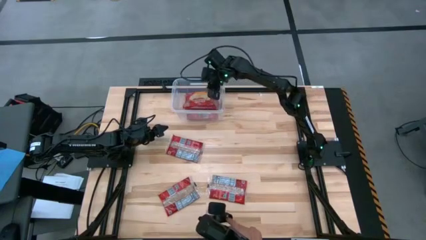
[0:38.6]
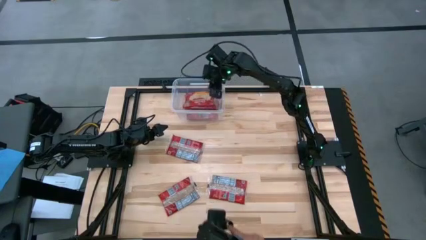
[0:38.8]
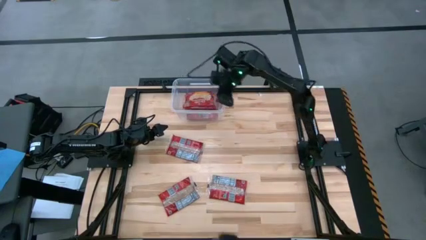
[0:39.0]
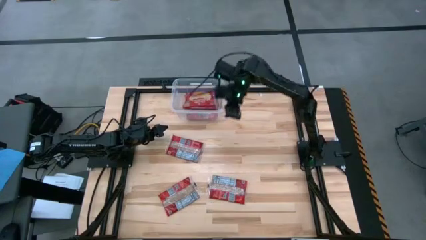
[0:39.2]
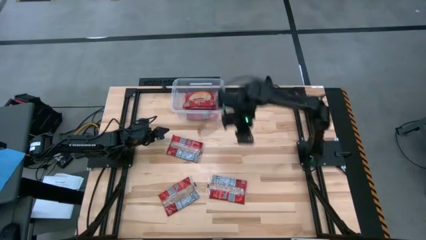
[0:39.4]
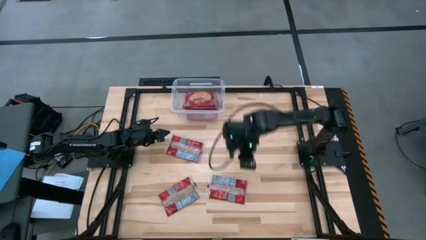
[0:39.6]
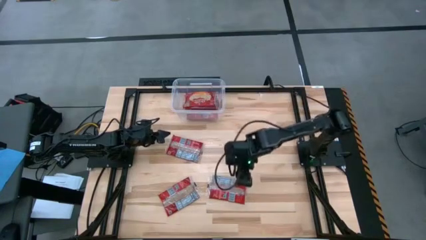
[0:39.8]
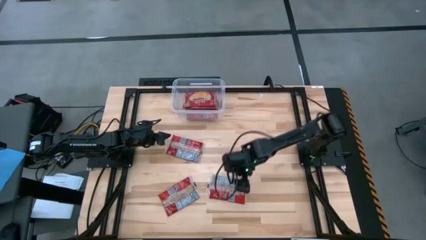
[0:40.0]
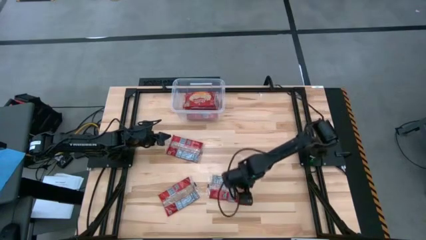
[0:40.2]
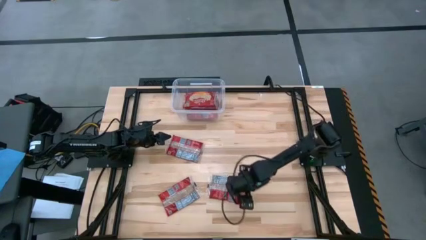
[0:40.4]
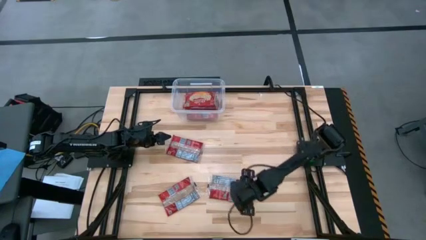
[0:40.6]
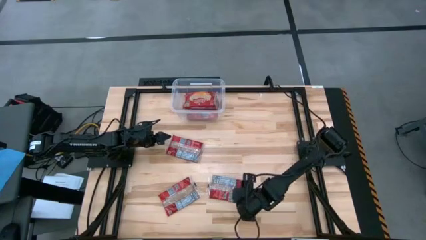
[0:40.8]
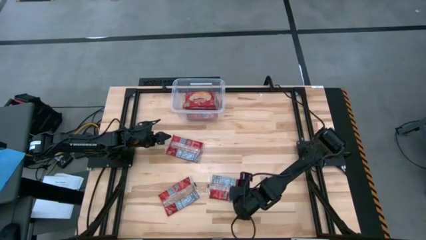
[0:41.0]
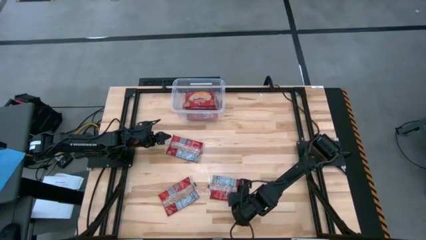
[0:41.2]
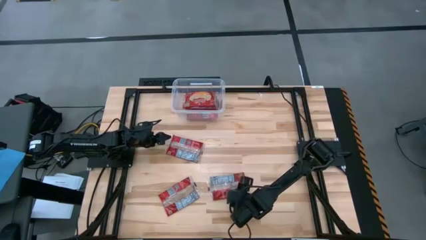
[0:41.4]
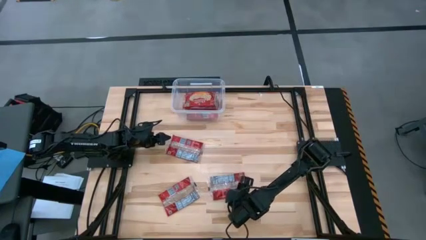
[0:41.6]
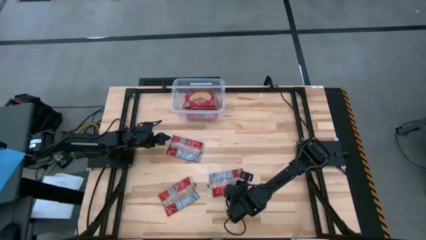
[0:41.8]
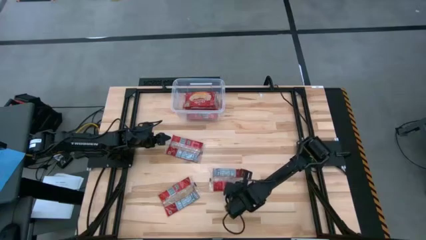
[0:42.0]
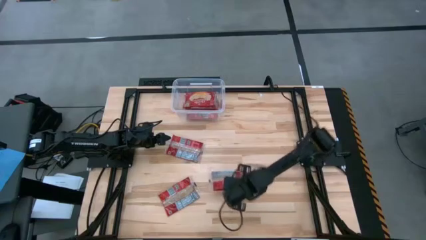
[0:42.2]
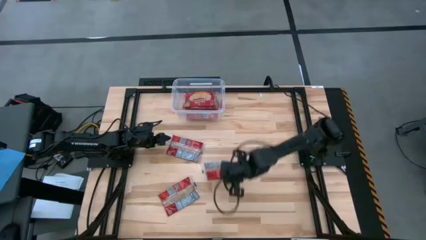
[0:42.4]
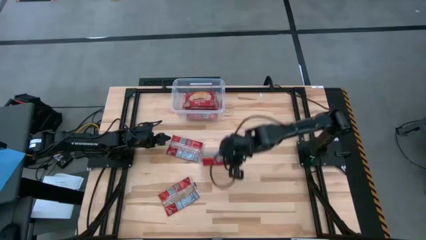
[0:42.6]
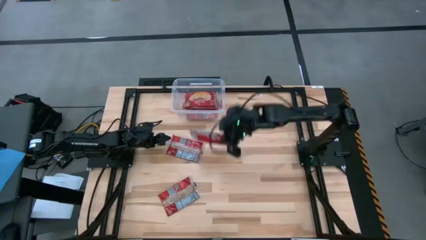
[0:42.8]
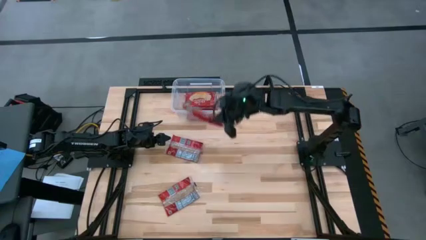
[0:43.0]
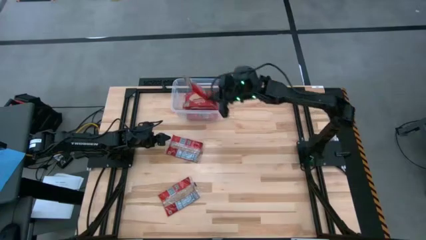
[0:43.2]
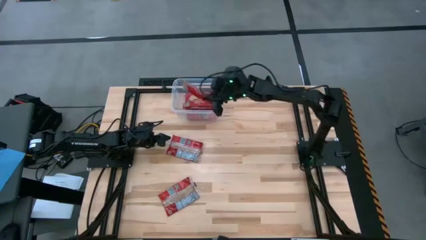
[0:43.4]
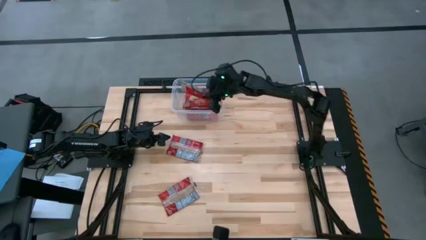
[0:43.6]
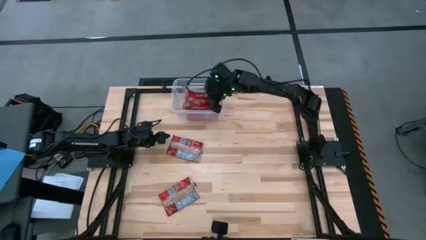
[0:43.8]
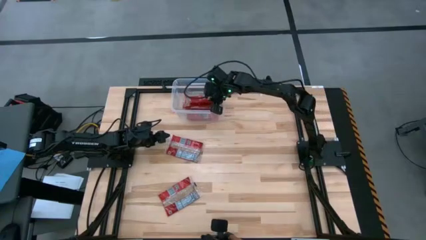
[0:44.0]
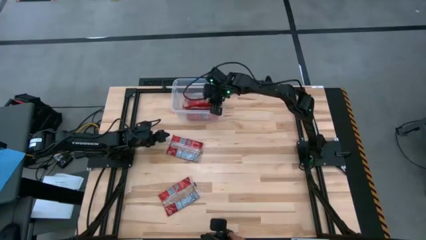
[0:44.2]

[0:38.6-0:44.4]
Task: Sort popcorn bags into baskets
Put the red popcorn bag into the transparent bin

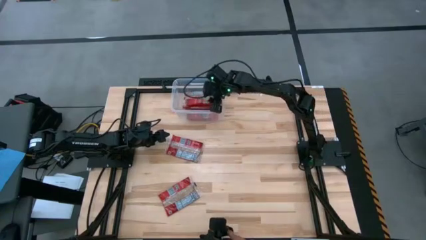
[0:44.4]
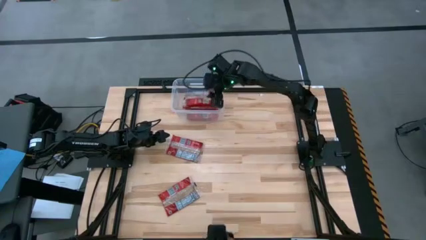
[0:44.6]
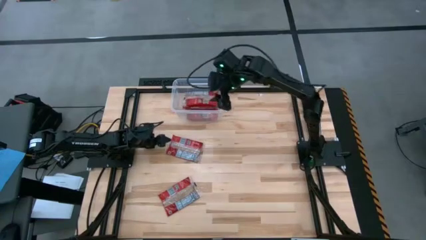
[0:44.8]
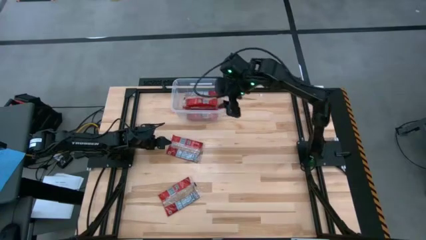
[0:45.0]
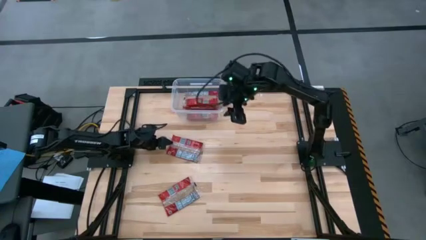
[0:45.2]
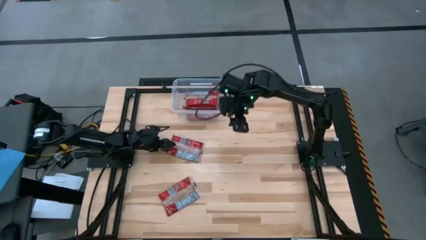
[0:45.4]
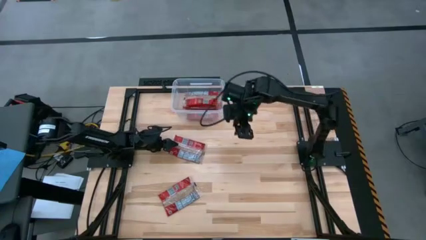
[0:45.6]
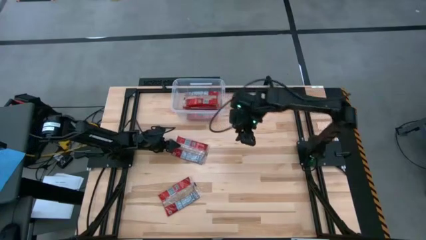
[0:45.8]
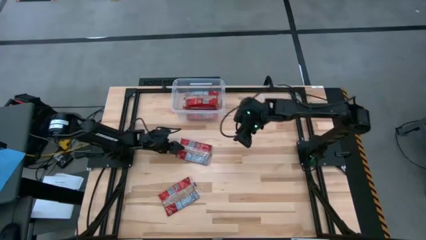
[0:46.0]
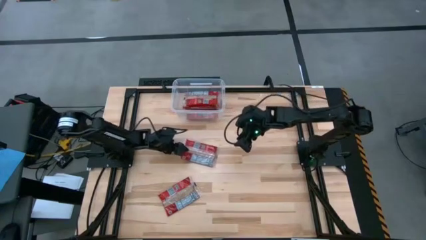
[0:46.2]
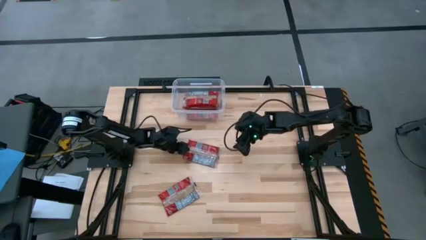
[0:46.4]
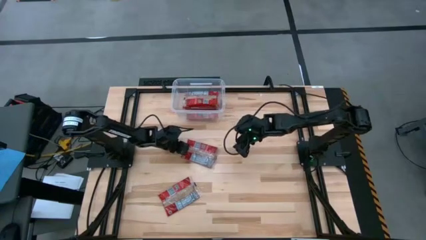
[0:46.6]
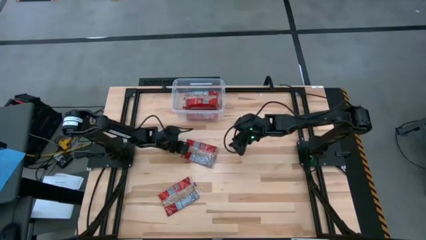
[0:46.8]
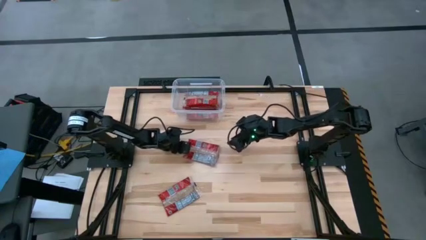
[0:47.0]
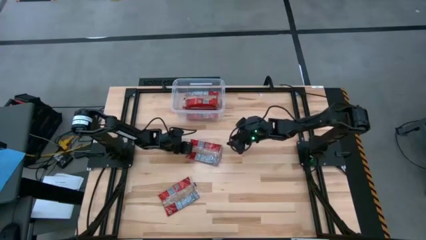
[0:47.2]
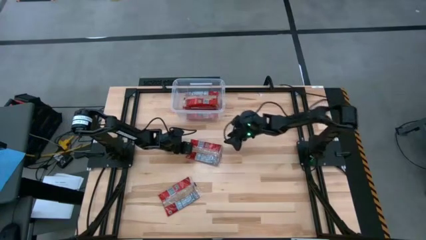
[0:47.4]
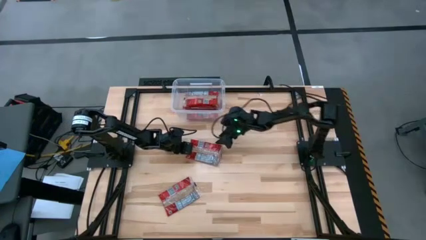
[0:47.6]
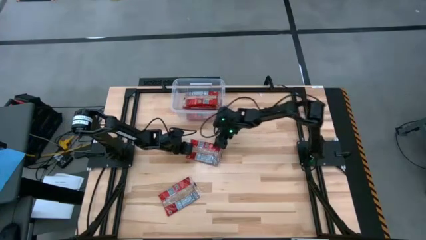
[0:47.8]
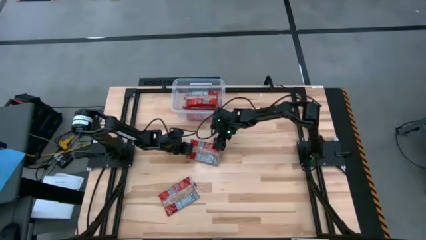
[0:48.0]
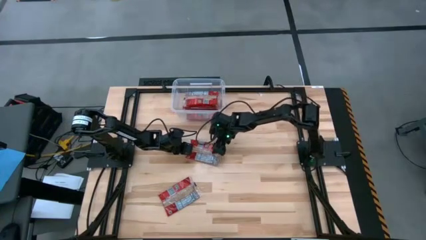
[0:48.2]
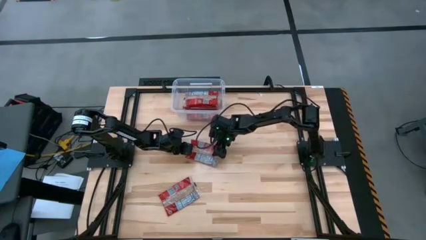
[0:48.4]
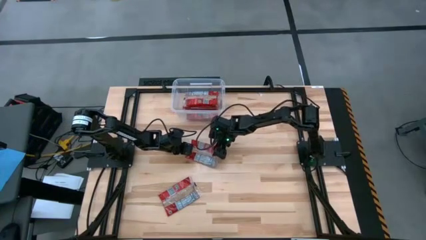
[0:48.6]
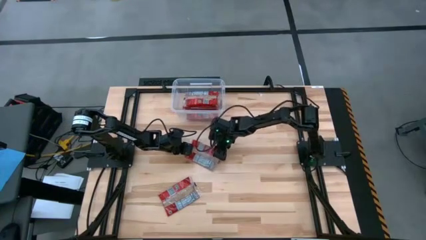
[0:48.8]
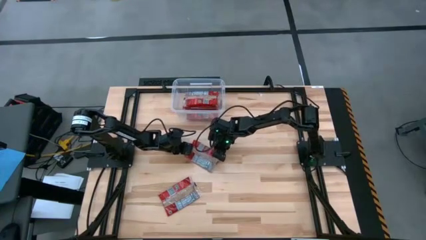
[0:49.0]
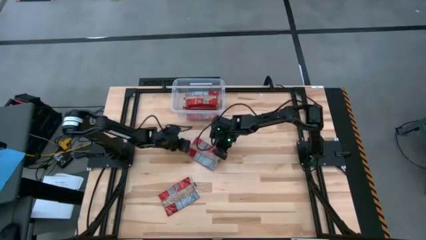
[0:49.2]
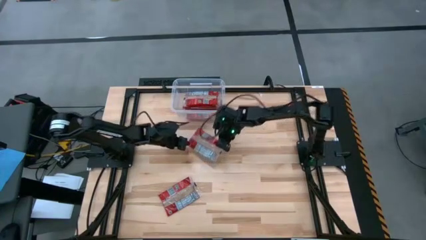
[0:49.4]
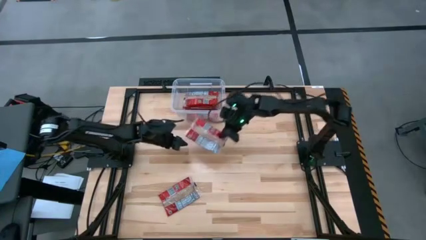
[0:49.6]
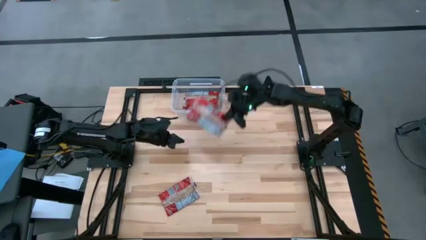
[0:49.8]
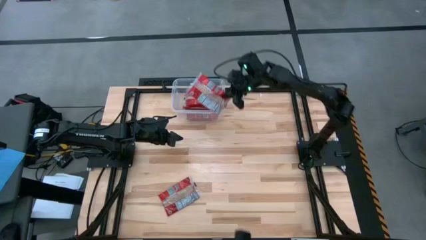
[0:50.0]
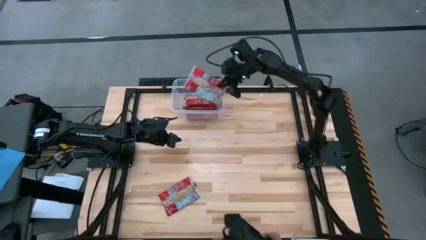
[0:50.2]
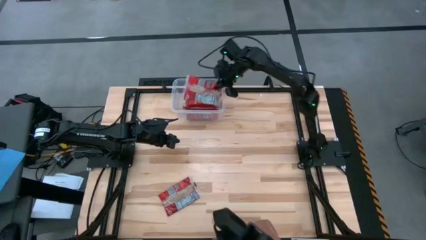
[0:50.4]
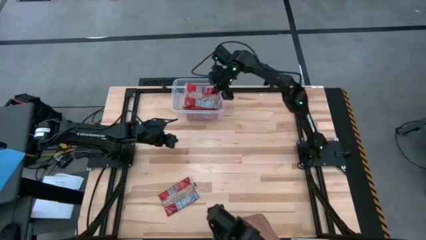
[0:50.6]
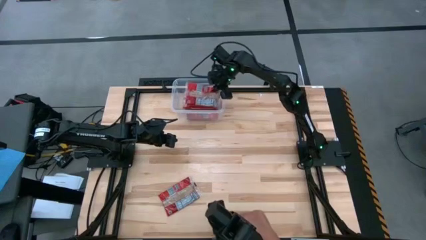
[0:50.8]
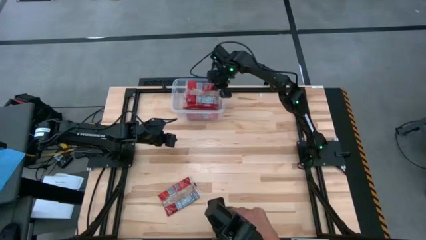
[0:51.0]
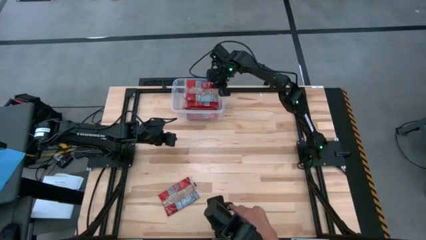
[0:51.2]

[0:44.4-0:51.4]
Put the red popcorn bag into the transparent bin

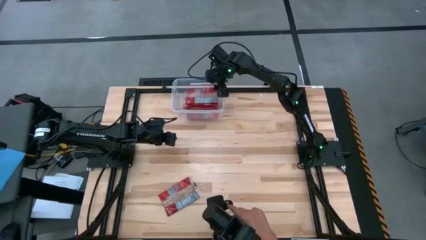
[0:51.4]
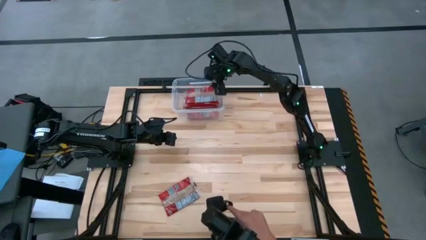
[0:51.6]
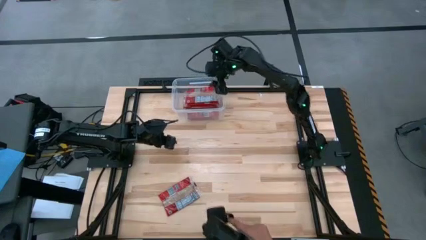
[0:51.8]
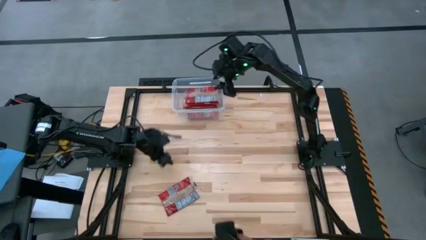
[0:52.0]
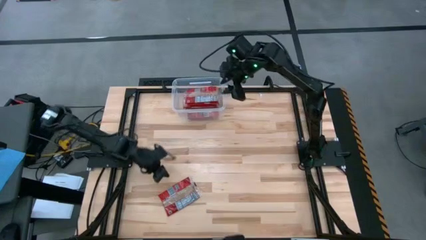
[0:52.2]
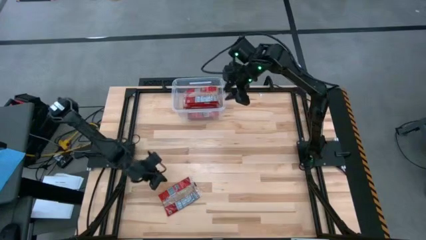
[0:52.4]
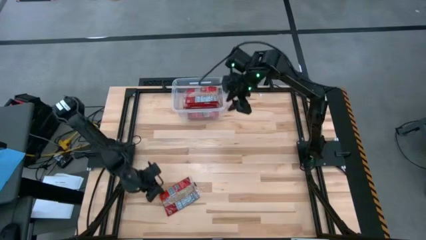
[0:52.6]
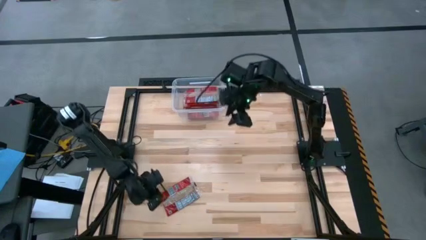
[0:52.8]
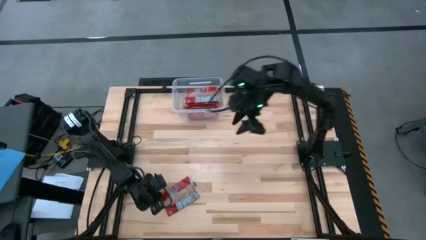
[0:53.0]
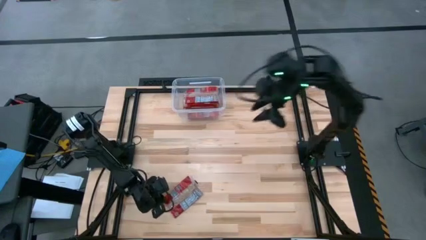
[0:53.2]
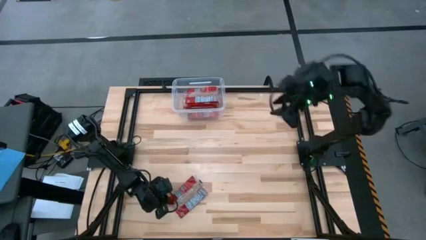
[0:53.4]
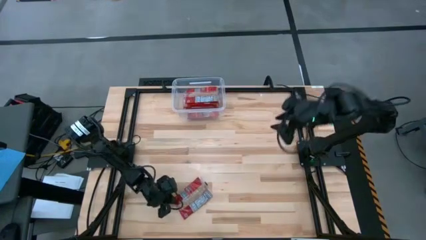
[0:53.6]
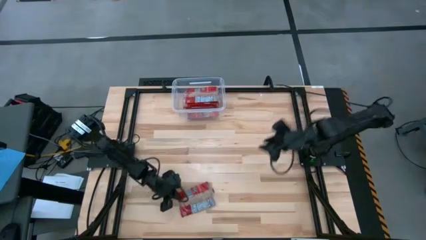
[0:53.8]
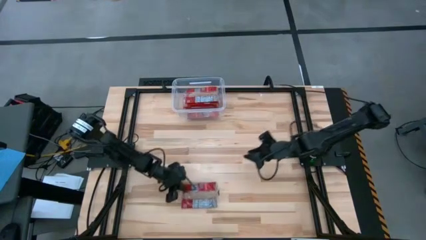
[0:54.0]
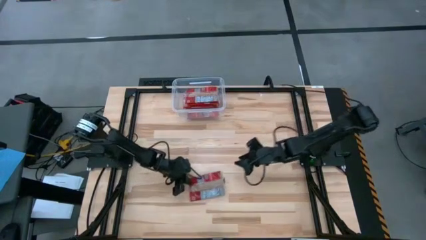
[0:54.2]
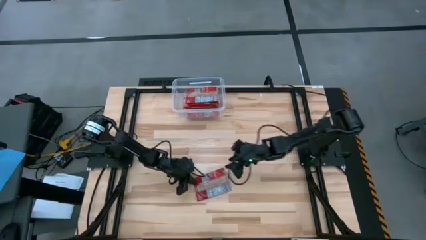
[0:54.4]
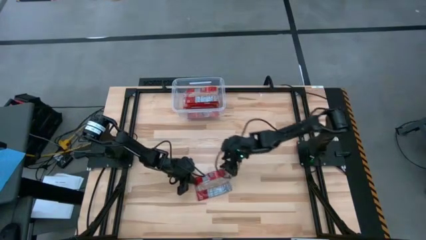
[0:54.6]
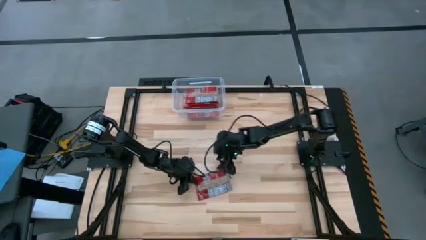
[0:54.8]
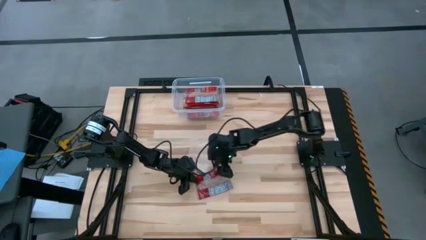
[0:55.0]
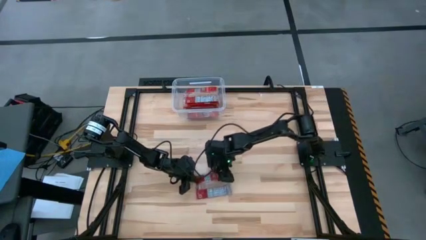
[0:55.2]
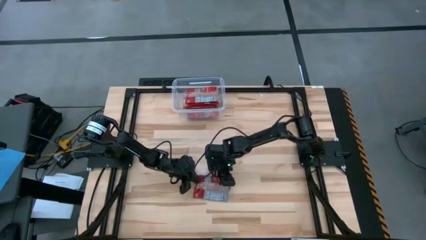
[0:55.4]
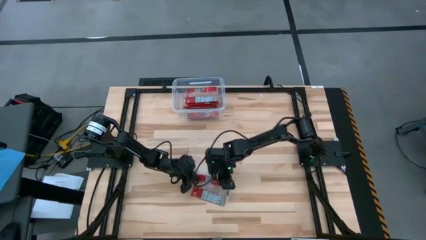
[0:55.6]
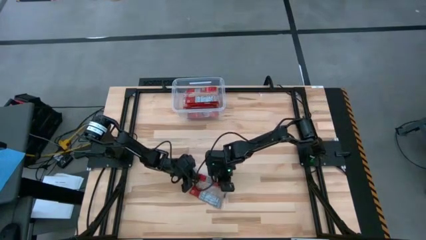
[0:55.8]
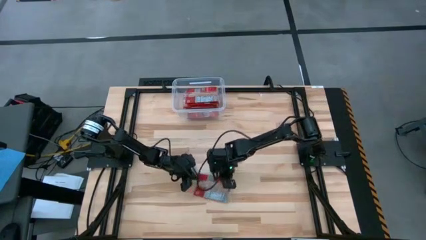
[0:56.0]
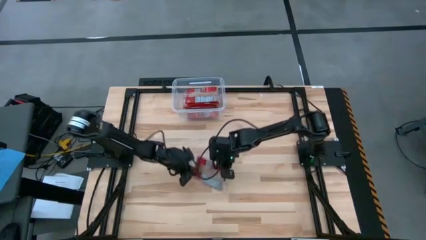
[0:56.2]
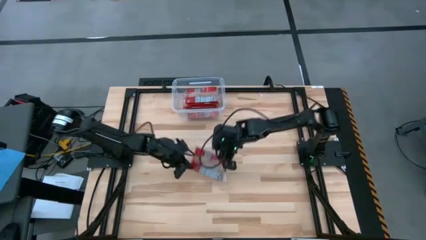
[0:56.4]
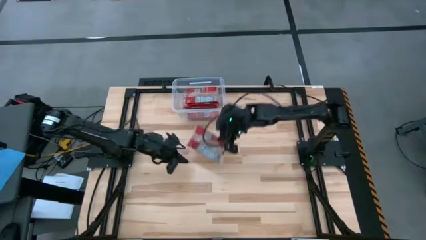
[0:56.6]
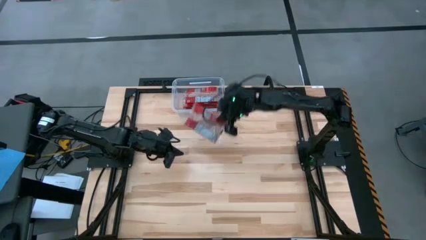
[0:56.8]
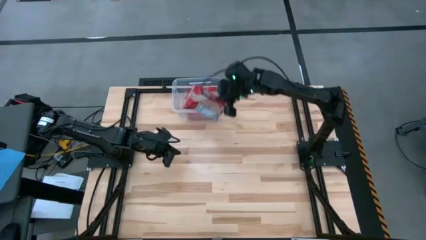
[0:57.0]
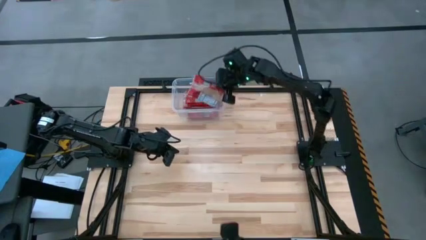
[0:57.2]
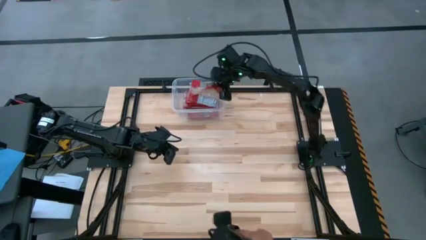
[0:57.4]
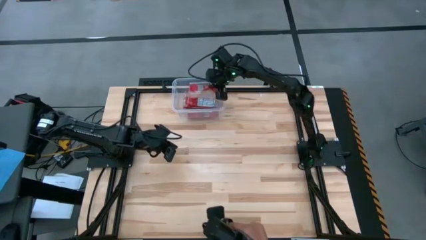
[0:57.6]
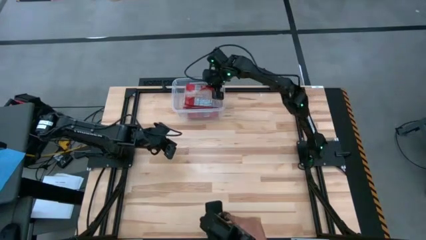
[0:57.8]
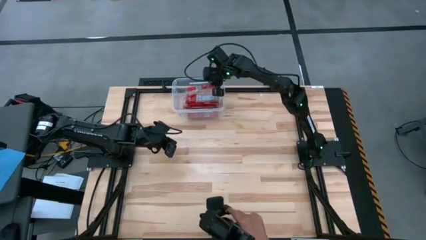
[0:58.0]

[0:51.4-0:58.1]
Put the red popcorn bag into the transparent bin
